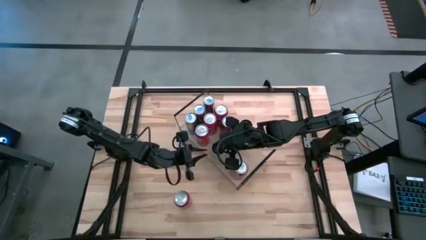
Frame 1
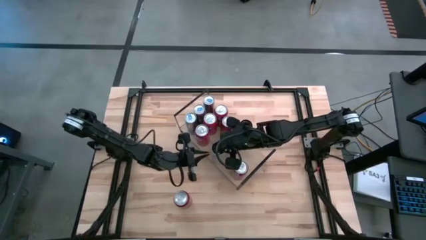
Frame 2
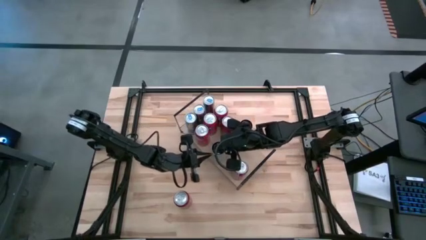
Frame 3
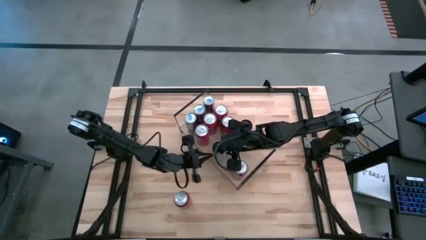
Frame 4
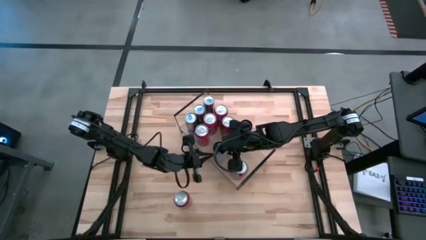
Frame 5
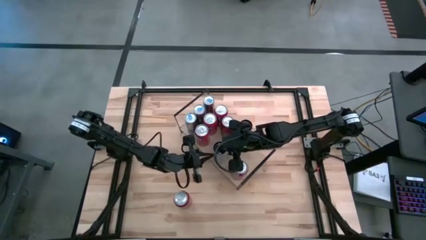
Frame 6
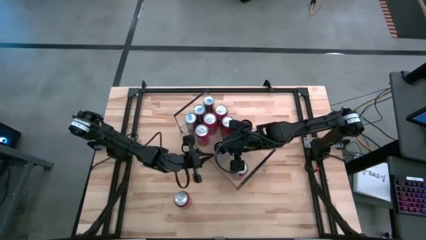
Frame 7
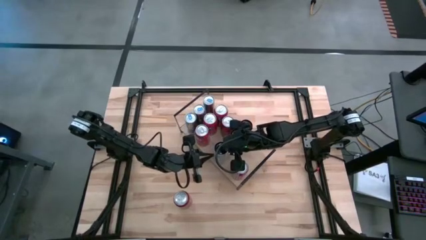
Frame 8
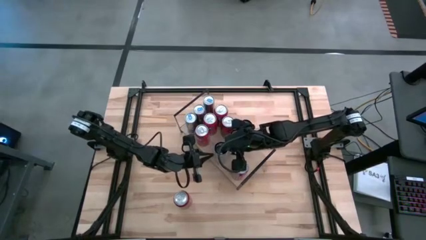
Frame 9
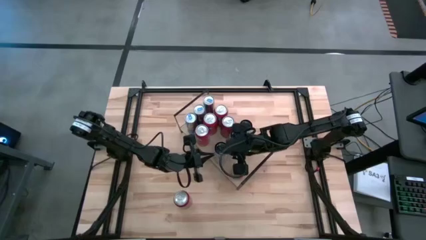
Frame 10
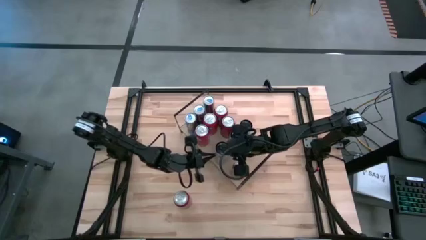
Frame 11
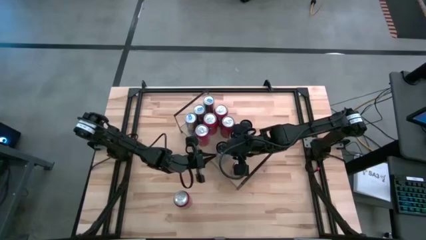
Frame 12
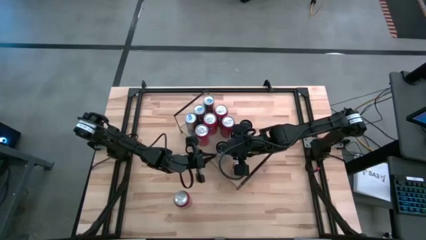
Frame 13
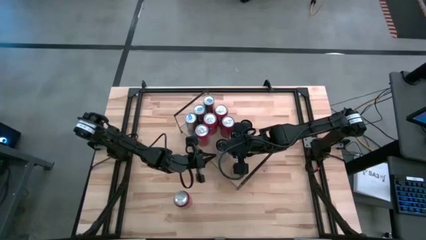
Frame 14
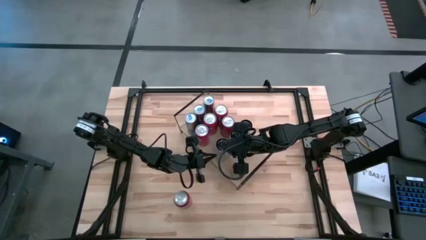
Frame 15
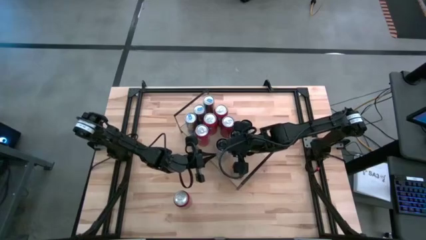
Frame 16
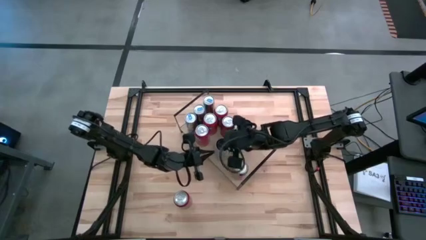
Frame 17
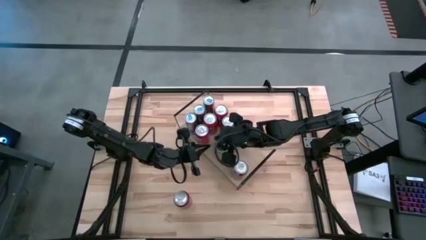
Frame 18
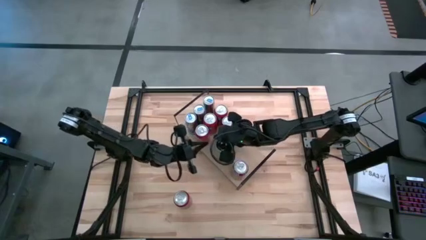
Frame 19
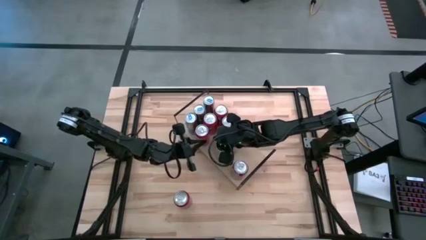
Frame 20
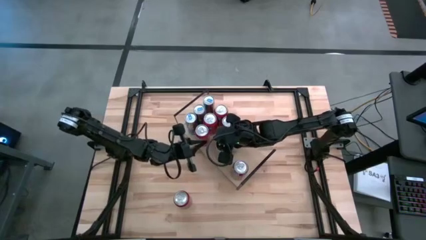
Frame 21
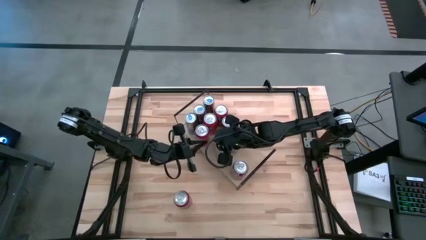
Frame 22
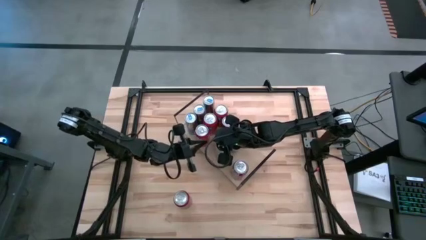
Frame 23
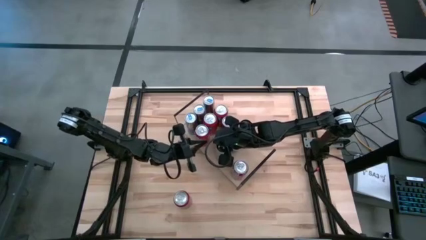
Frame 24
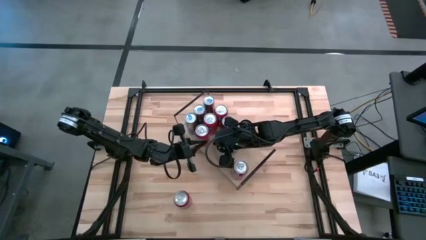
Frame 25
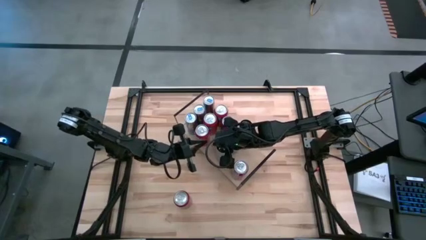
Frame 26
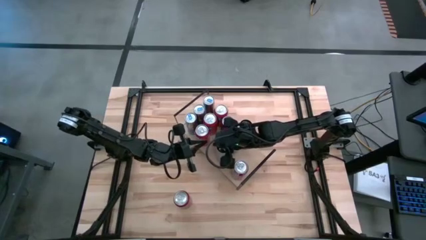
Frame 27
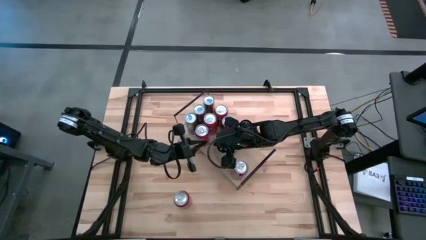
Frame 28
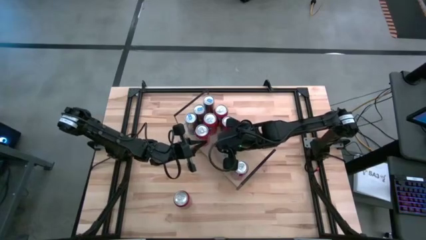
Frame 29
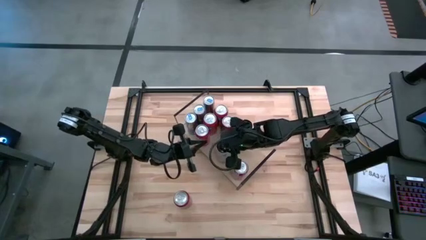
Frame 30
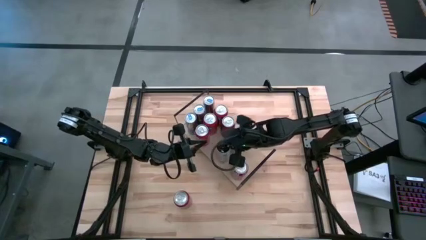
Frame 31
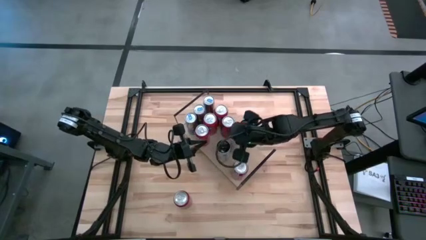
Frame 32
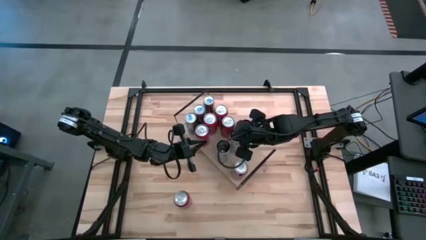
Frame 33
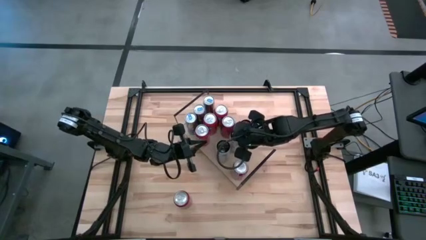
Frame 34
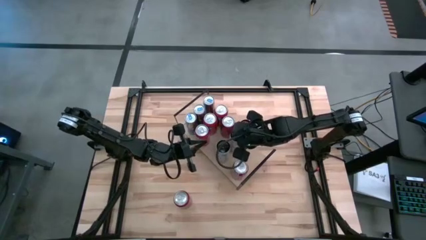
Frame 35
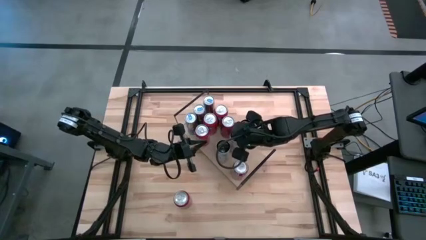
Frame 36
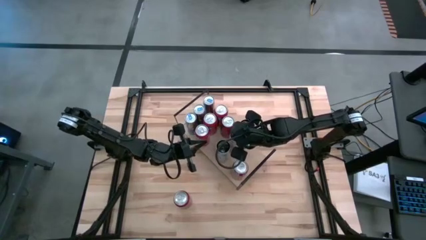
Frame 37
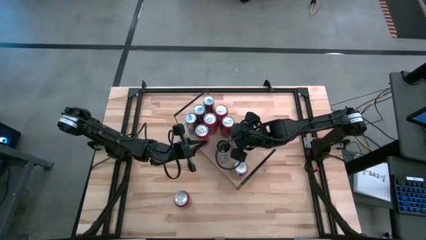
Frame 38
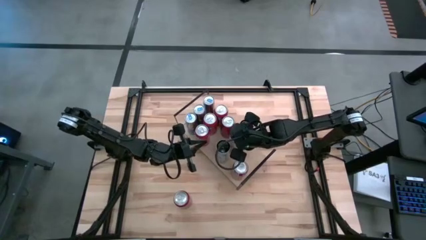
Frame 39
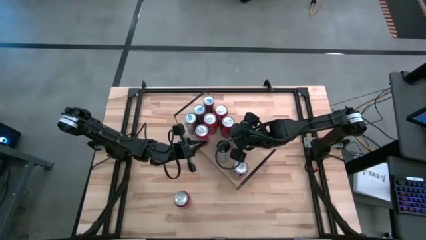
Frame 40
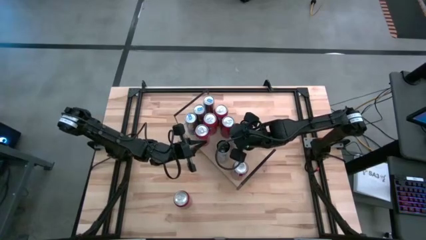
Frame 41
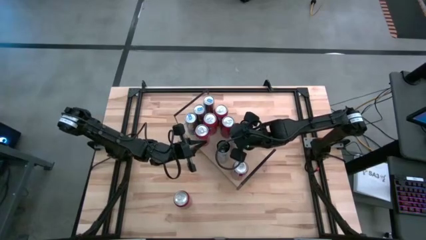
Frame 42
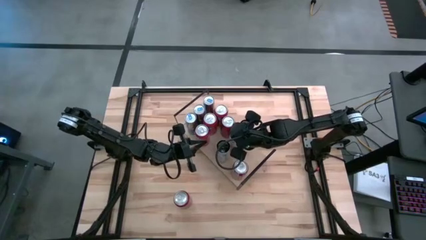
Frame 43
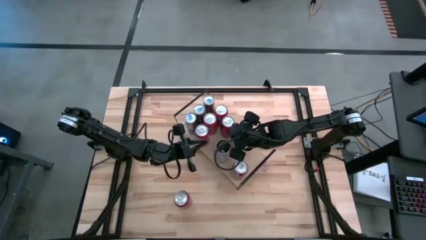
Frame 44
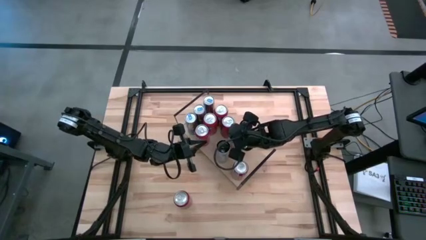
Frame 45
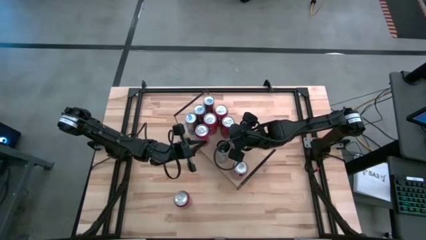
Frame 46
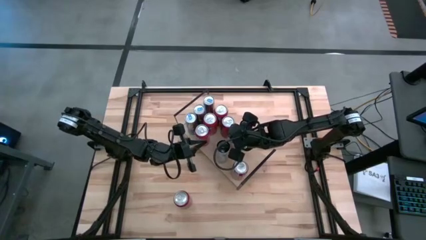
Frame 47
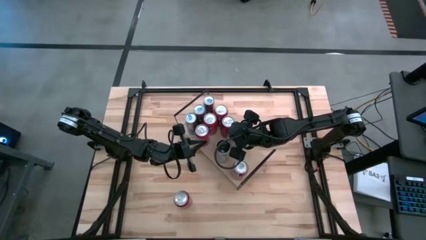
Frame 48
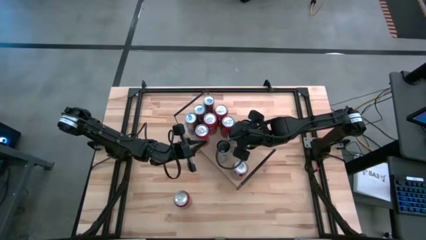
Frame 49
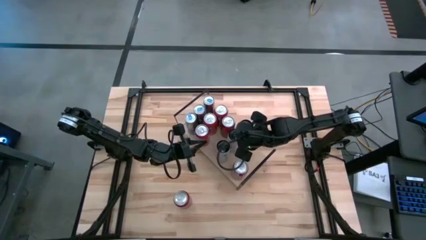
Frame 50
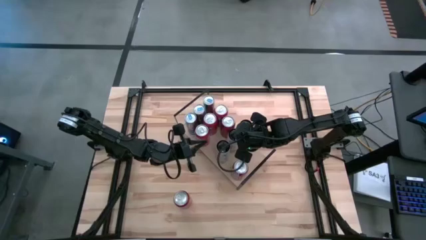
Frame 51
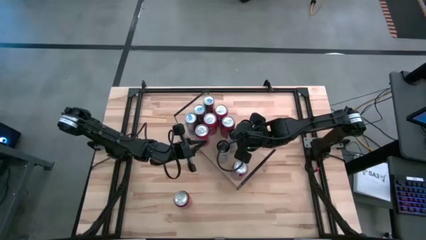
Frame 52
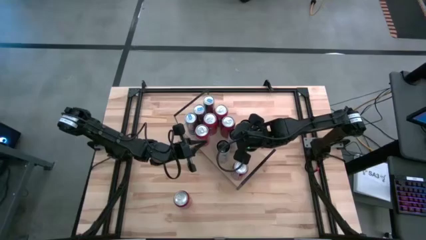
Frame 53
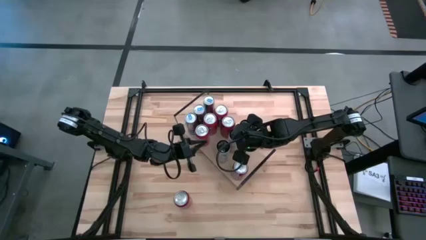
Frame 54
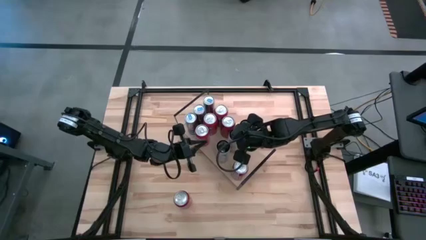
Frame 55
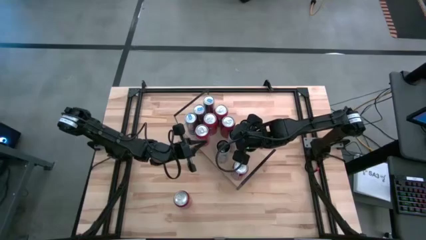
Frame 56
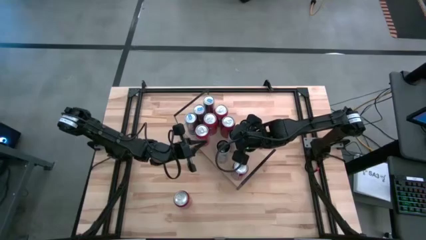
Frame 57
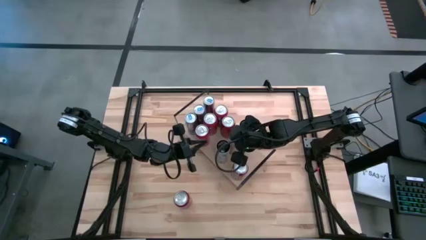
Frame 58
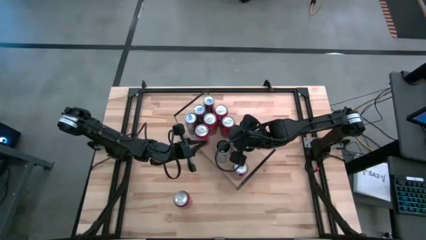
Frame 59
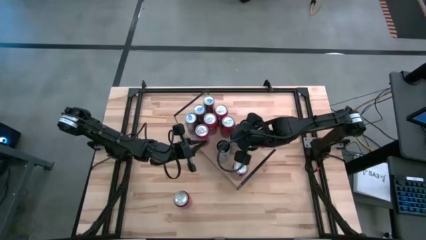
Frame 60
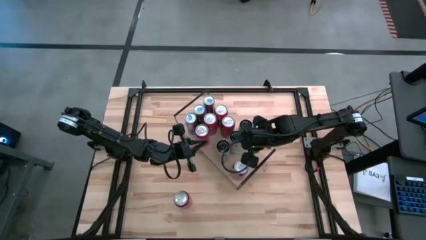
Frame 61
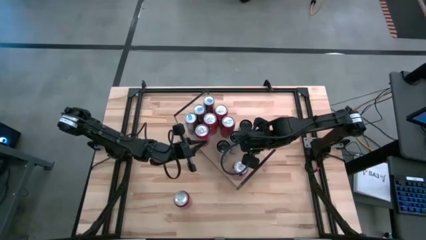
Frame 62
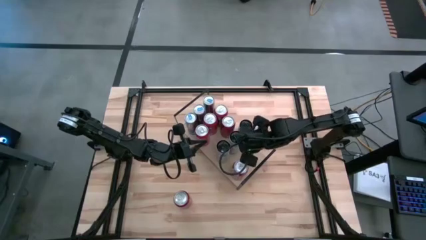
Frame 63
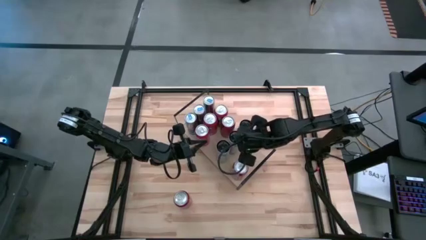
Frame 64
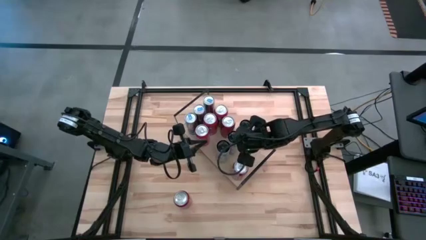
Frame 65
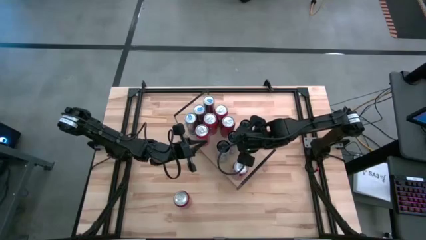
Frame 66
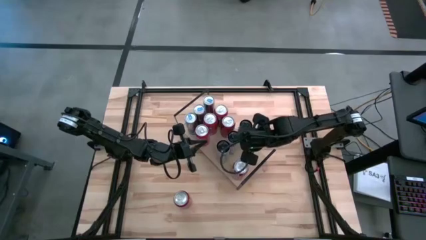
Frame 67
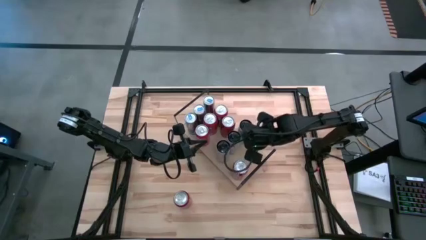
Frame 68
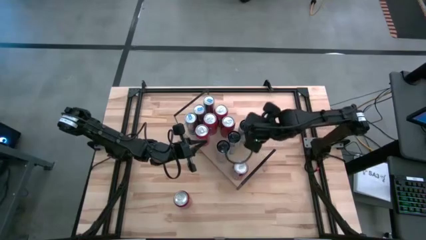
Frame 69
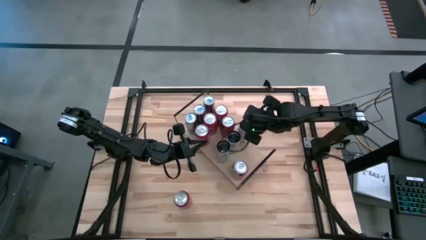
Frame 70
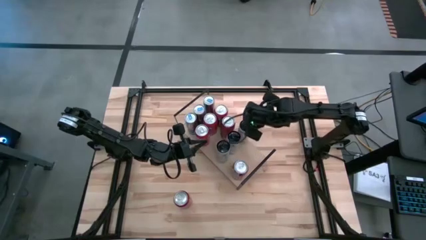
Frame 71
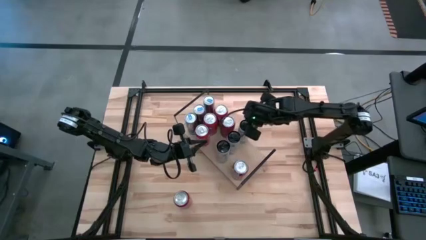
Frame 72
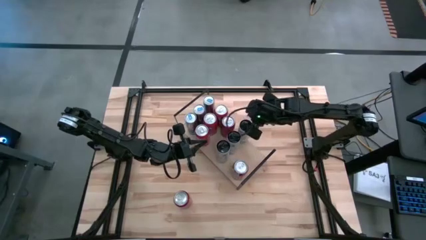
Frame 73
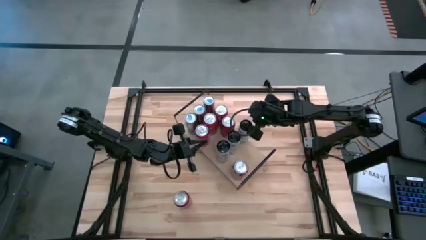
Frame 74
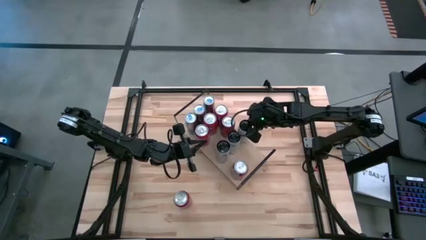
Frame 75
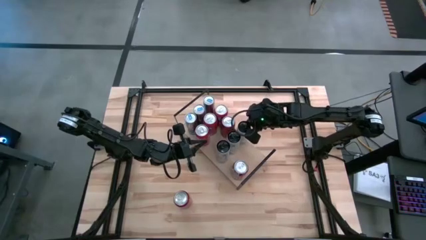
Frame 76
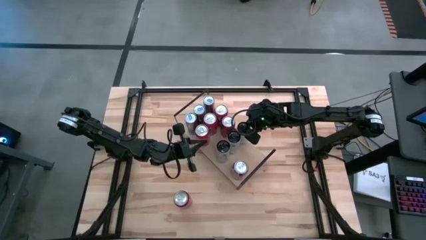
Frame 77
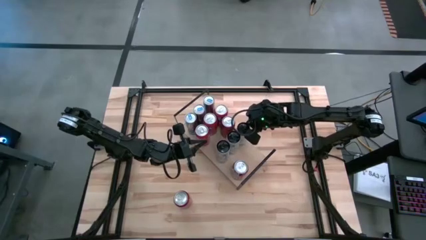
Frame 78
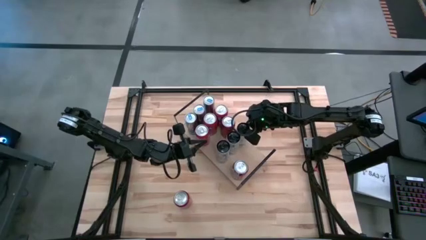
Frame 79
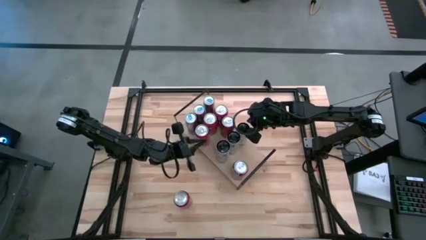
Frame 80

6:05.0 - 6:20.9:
Task: Place canned beverage on shelf
Put the pink soda can on the shelf aligned with the pink soda can on the shelf
